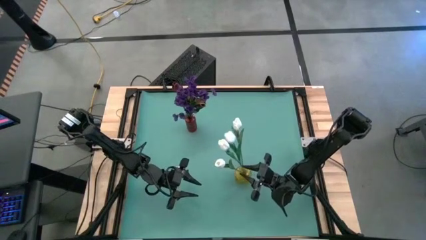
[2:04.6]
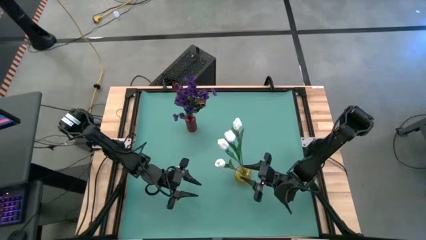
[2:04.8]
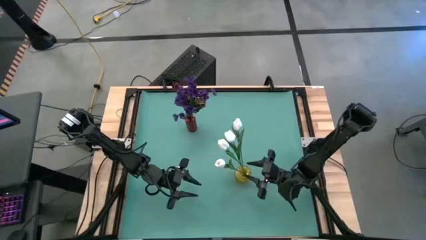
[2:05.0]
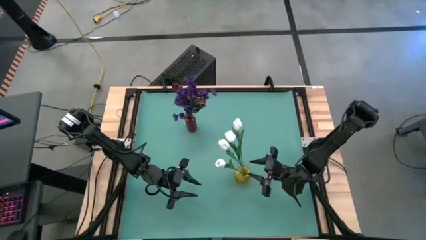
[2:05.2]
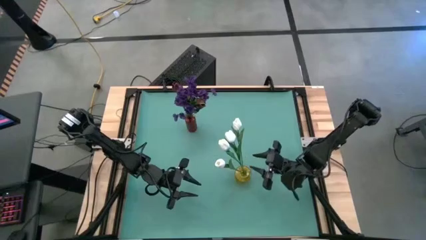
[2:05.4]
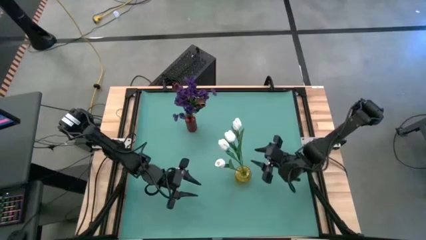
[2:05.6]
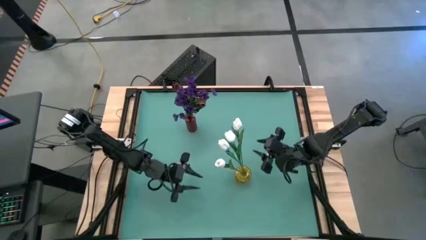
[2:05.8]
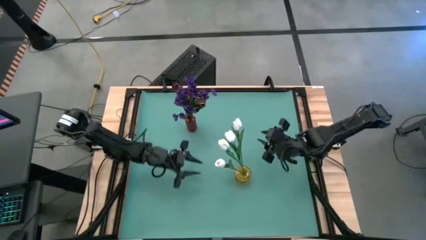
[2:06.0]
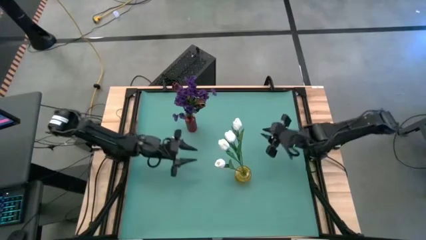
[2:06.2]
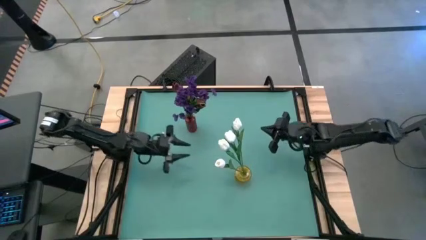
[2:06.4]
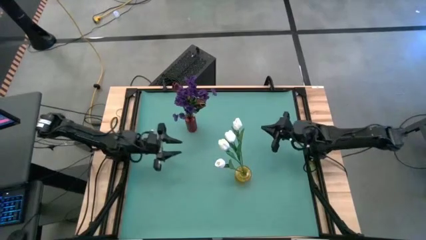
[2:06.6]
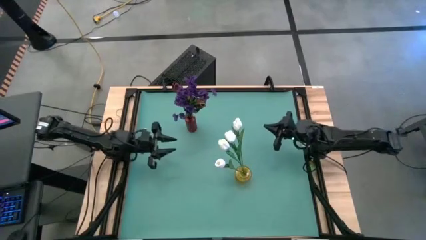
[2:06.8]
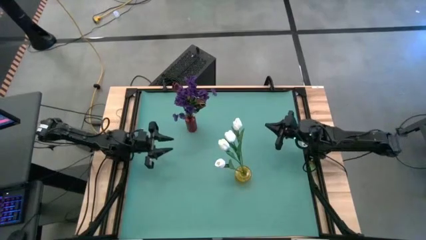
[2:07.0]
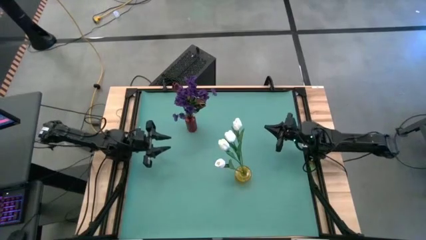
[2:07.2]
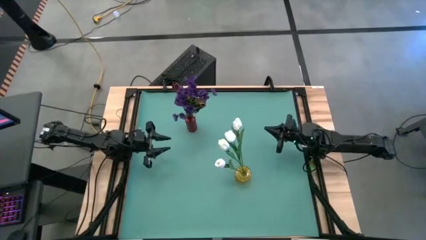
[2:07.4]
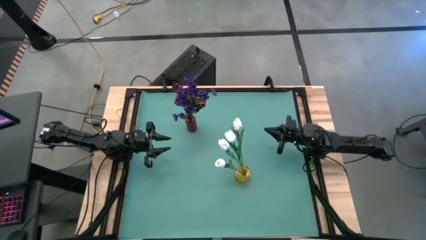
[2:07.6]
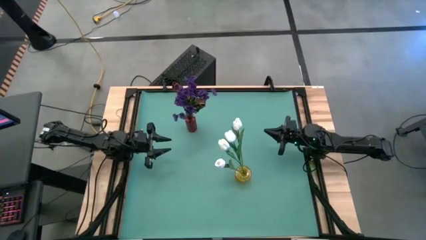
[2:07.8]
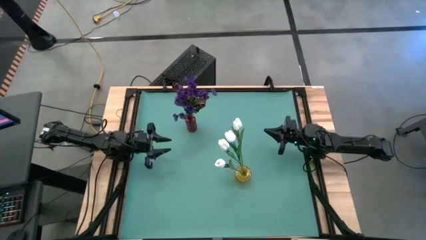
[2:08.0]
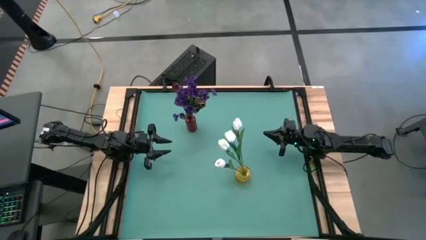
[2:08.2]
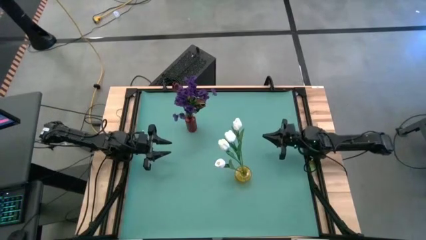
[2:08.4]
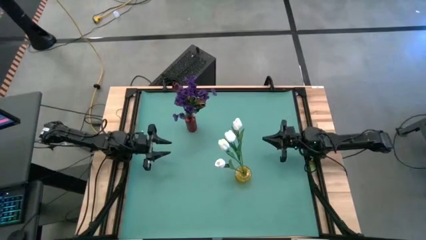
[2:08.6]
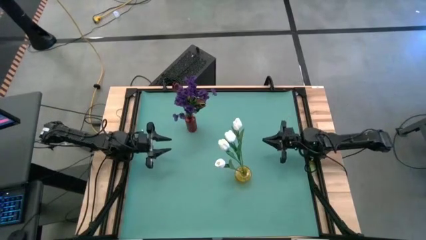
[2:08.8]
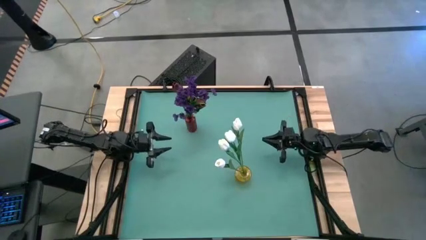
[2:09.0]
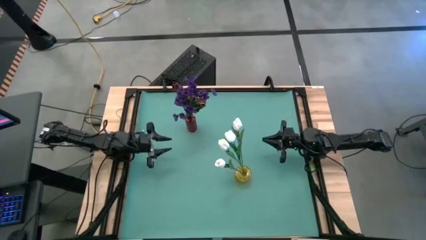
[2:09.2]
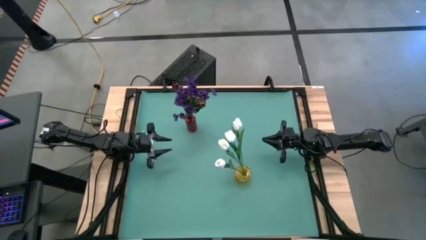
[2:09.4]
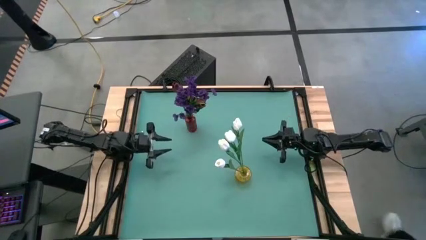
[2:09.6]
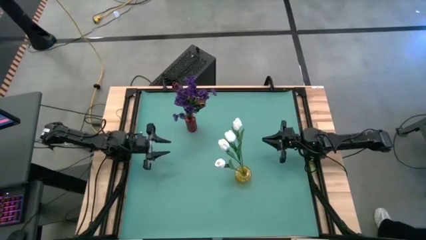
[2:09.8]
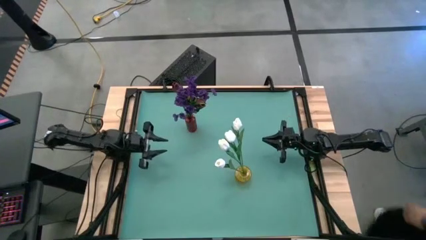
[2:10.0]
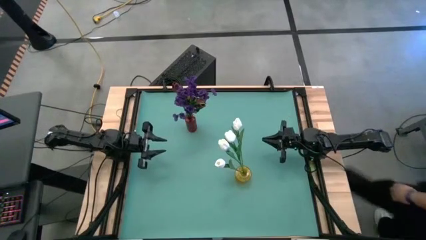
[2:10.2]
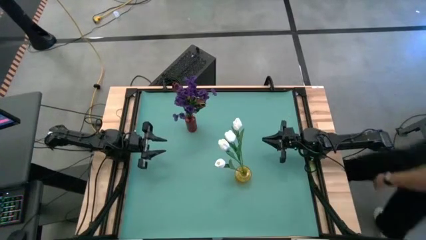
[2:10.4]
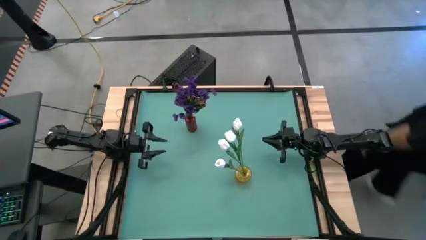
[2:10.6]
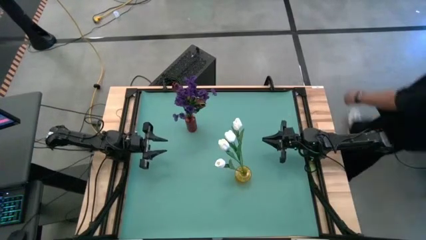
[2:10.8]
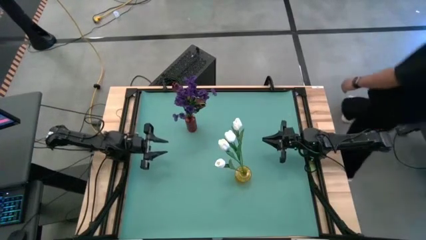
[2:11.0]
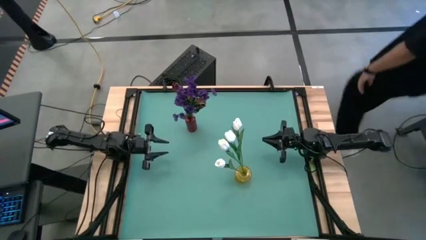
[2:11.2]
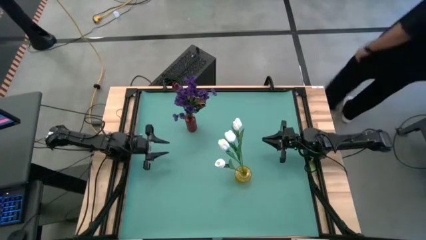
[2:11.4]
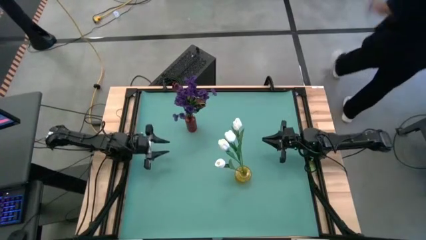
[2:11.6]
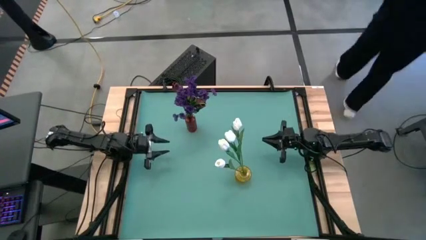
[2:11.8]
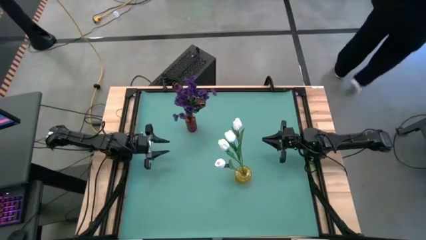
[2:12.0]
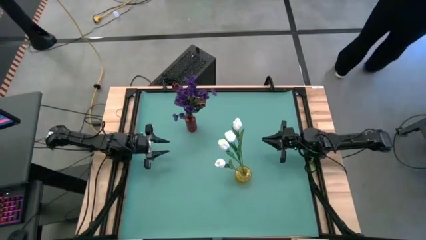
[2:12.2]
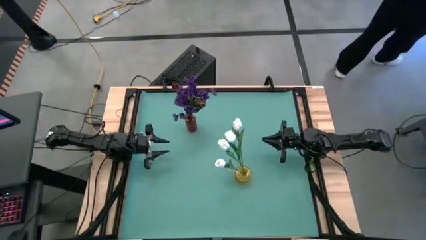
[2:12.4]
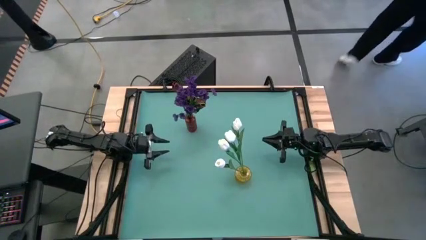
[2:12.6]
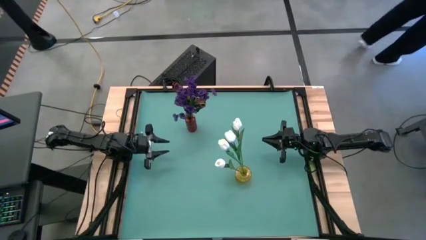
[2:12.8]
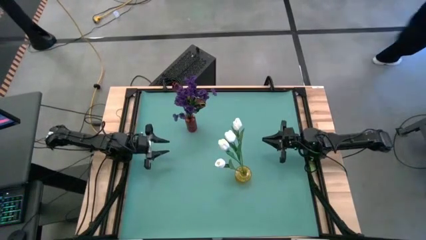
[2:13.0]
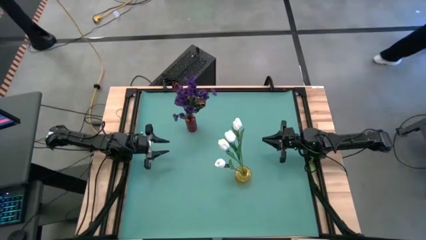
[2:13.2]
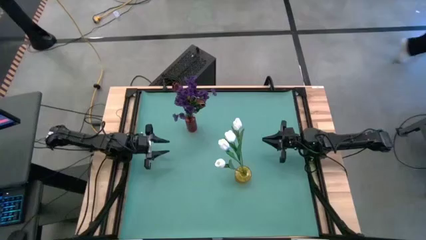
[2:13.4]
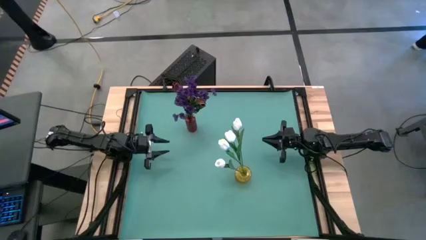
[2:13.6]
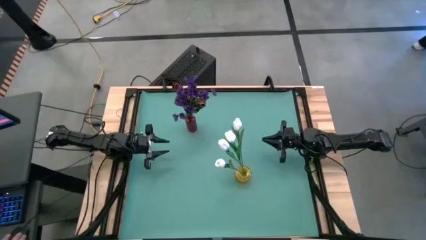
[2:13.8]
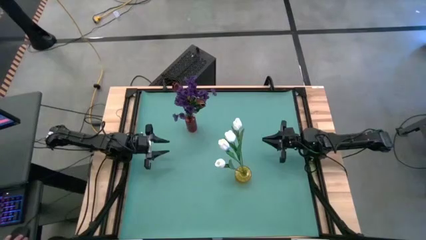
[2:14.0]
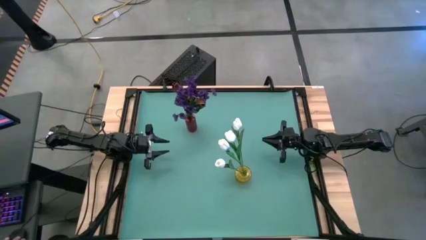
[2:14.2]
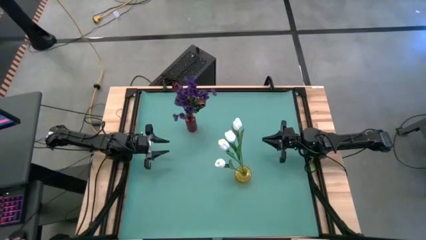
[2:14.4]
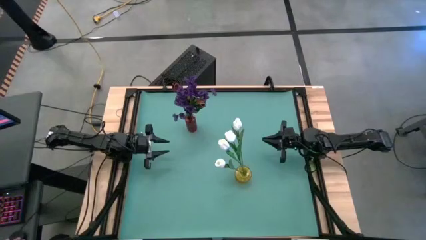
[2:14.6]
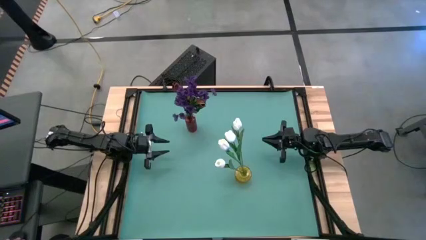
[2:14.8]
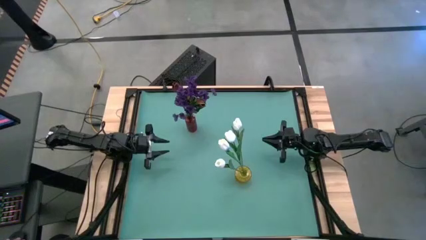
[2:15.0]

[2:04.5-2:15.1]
Task: Sort flowers into vase by color
Return to Home Position

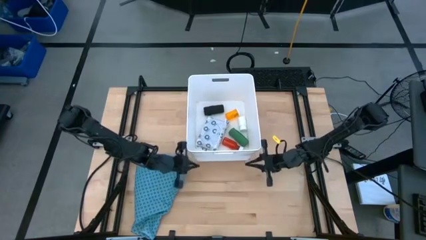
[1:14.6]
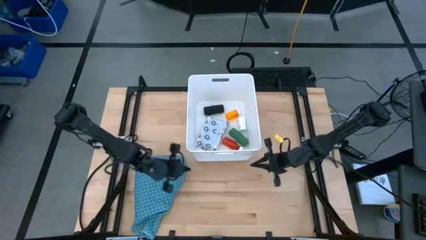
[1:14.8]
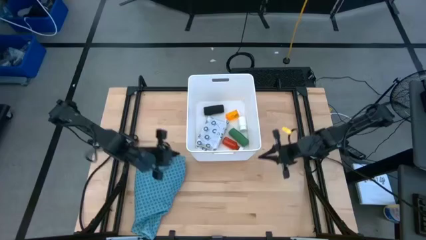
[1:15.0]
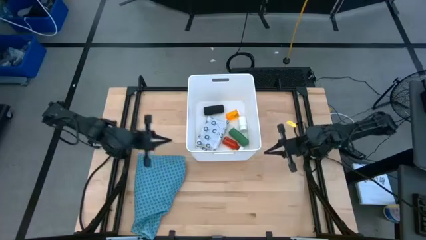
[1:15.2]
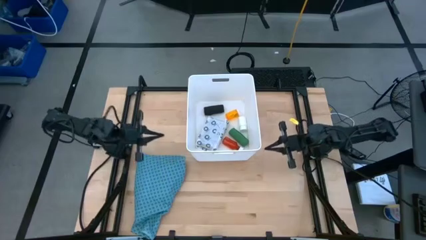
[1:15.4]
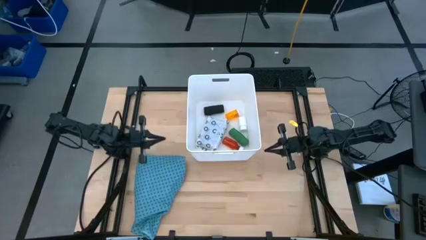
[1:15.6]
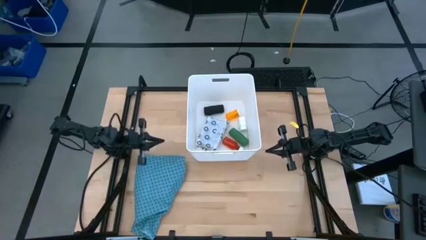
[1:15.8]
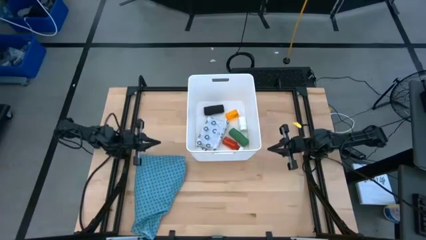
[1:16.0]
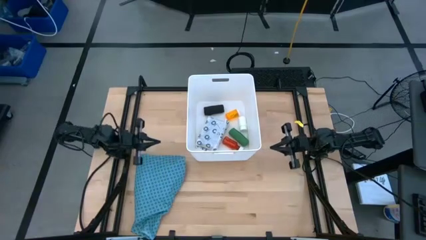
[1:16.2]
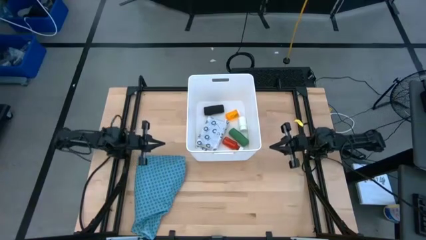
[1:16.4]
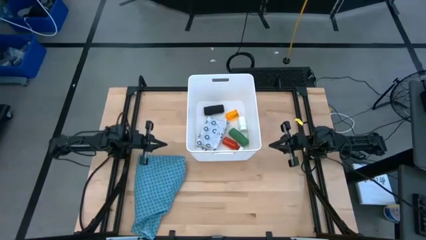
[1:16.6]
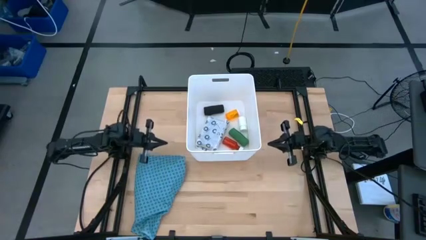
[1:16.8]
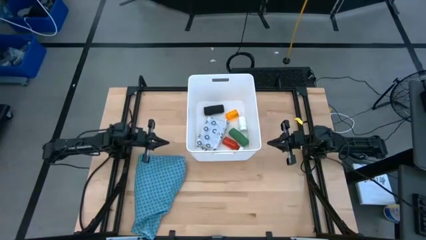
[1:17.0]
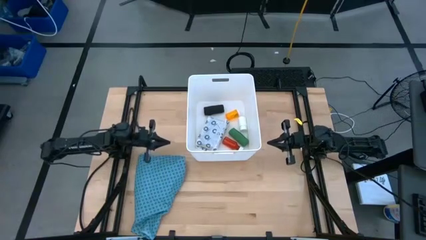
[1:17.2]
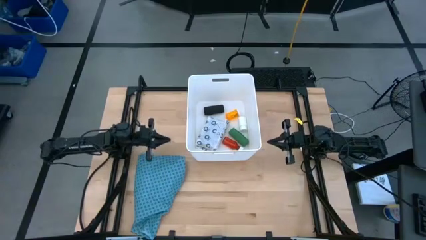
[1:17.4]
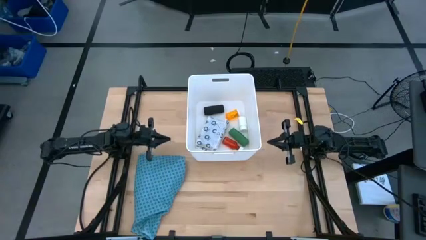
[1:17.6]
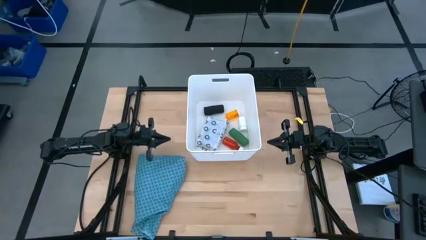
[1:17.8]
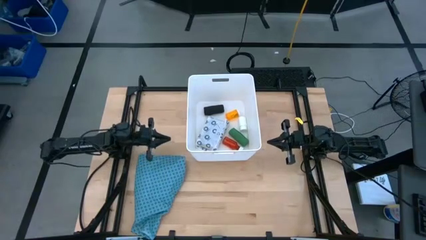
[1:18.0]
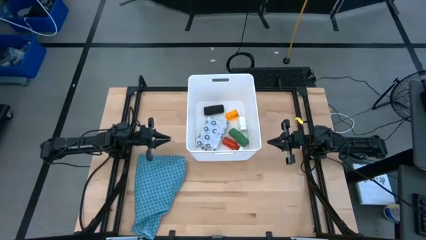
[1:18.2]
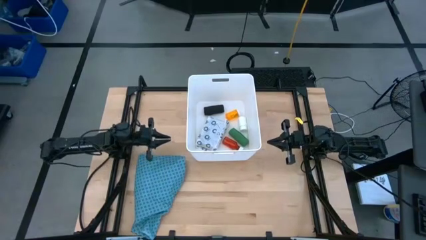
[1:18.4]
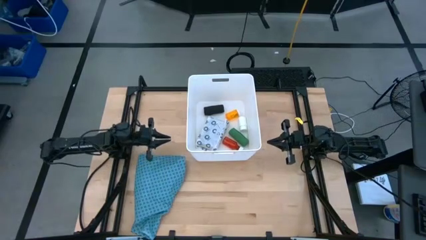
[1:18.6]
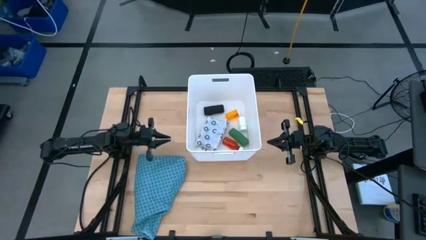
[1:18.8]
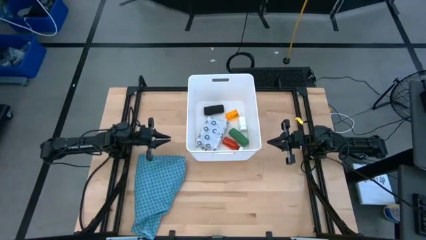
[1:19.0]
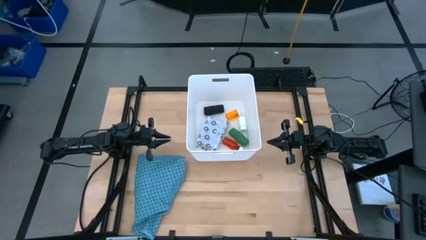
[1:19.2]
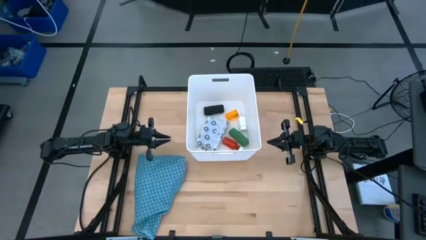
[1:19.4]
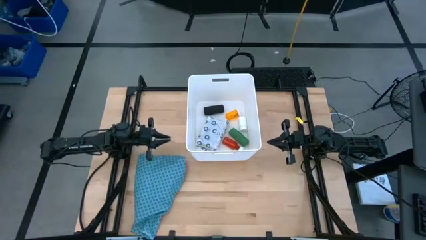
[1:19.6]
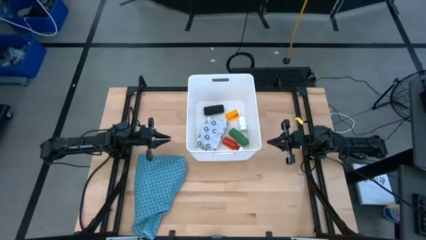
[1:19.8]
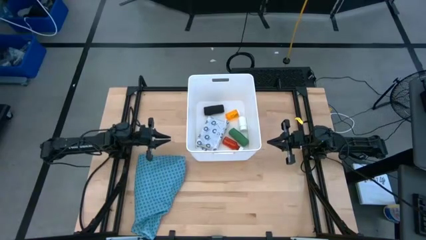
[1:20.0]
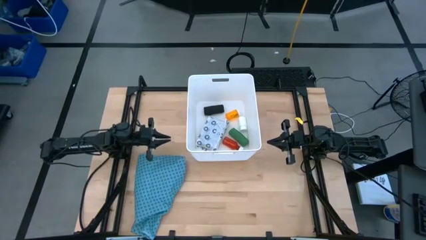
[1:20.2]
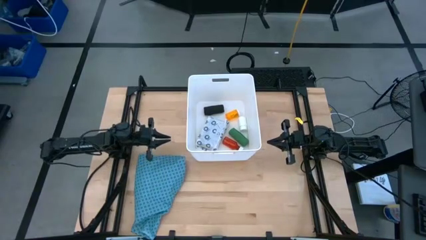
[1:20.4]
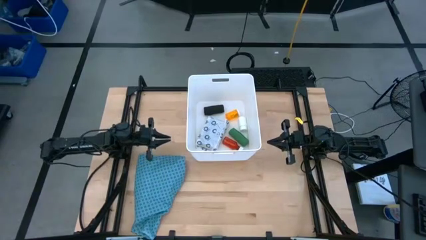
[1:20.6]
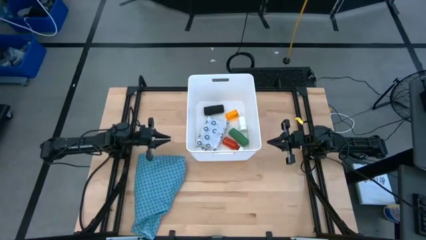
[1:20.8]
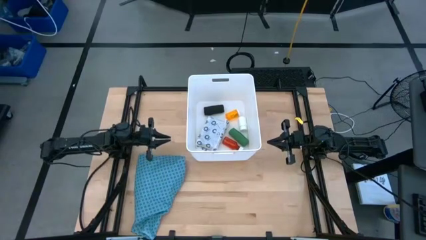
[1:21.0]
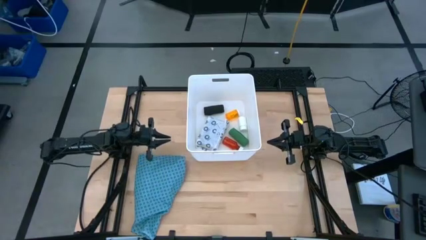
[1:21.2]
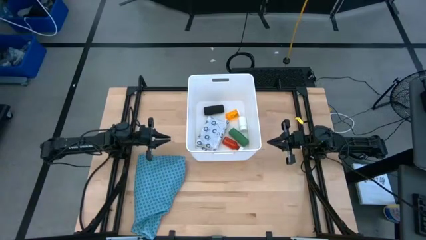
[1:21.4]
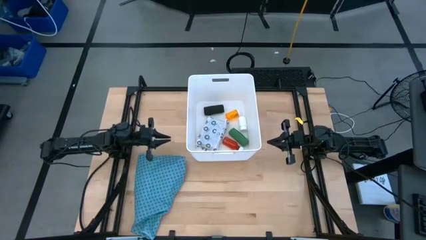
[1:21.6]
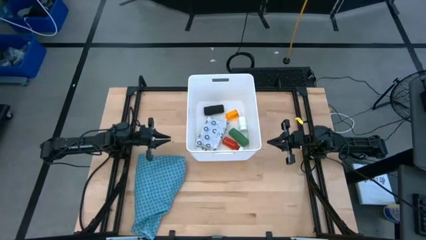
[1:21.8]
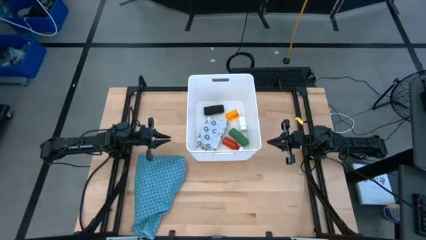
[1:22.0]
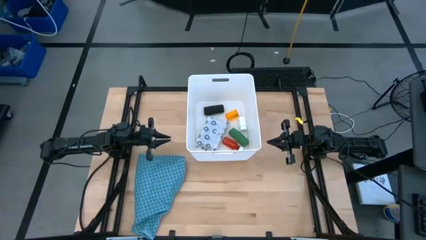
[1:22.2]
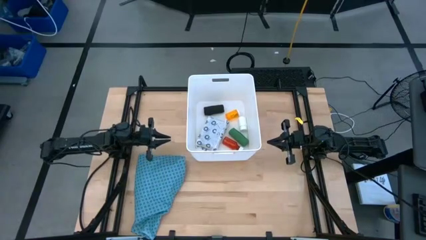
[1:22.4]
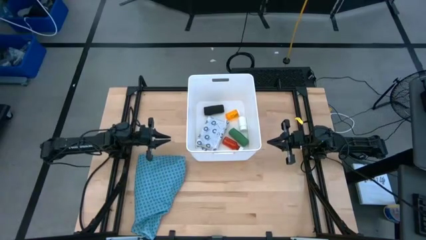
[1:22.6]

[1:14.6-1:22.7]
Task: Pick & place medical supplies in basket/bin
Return to Home Position
